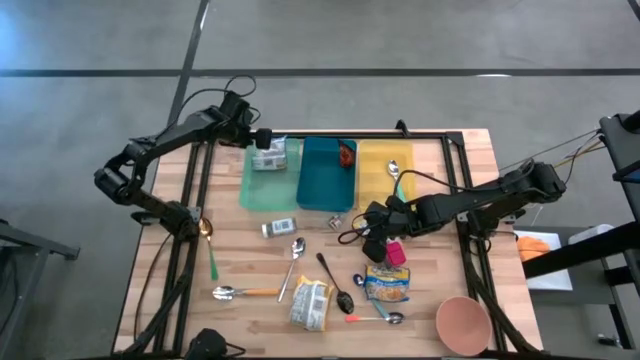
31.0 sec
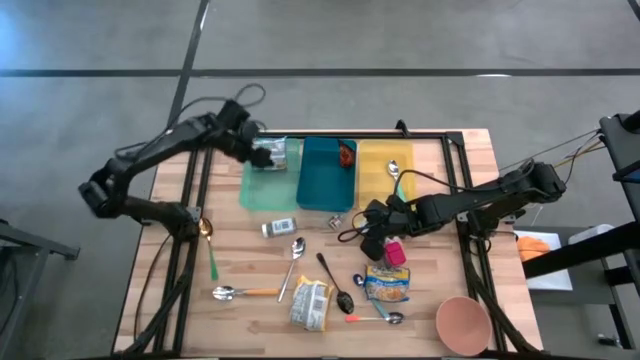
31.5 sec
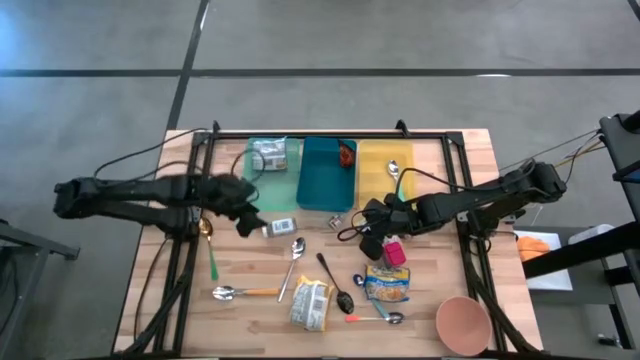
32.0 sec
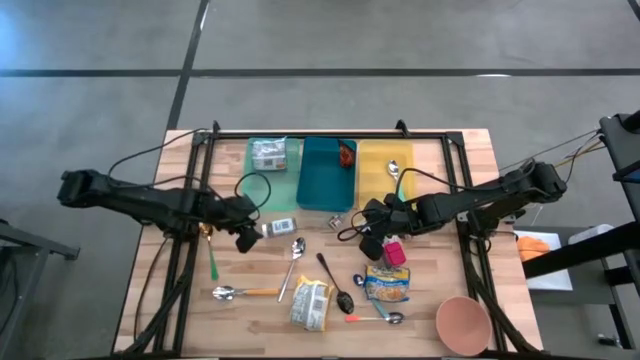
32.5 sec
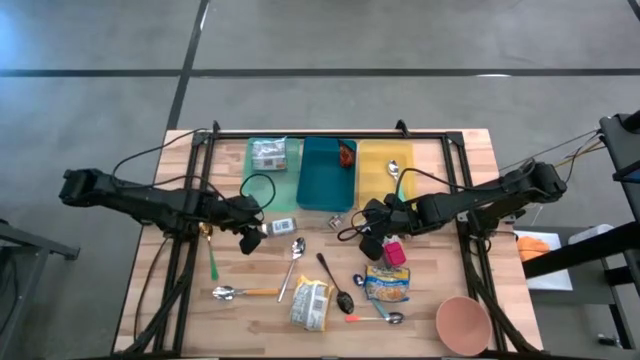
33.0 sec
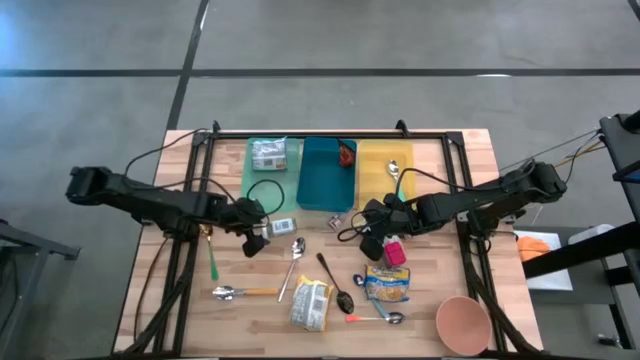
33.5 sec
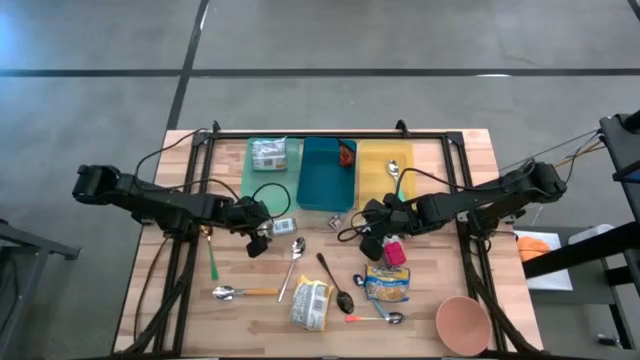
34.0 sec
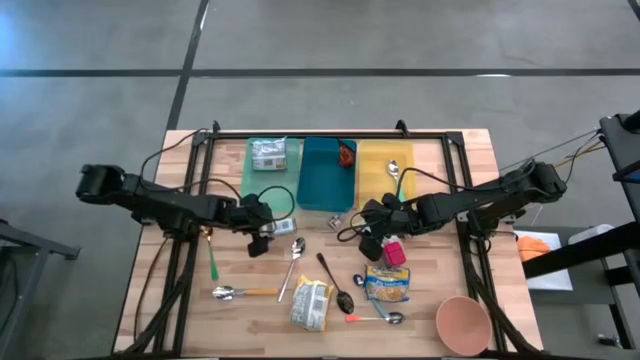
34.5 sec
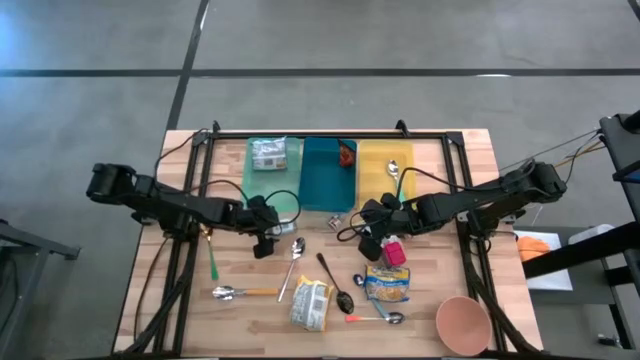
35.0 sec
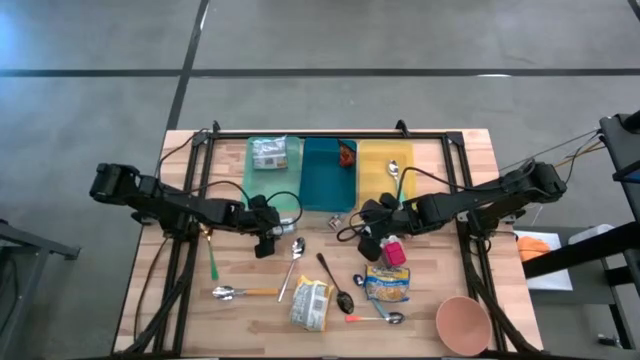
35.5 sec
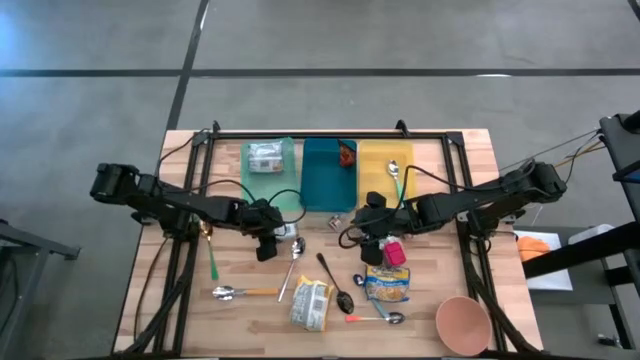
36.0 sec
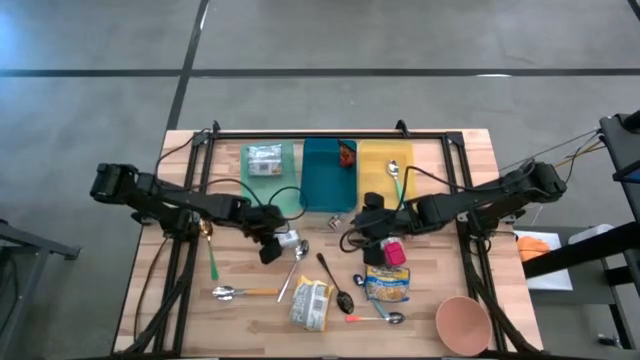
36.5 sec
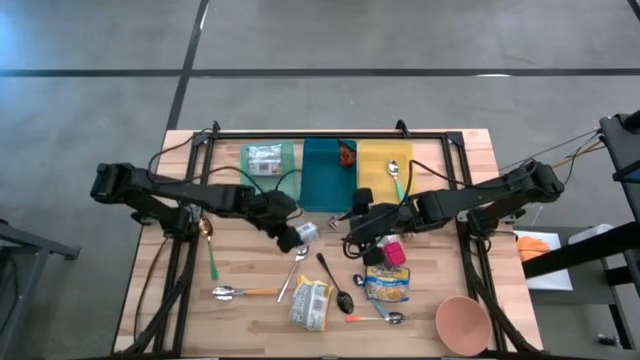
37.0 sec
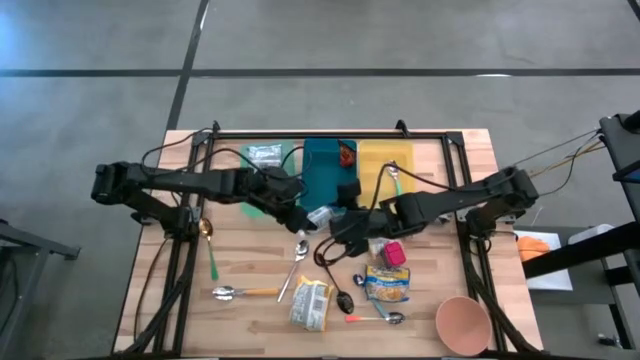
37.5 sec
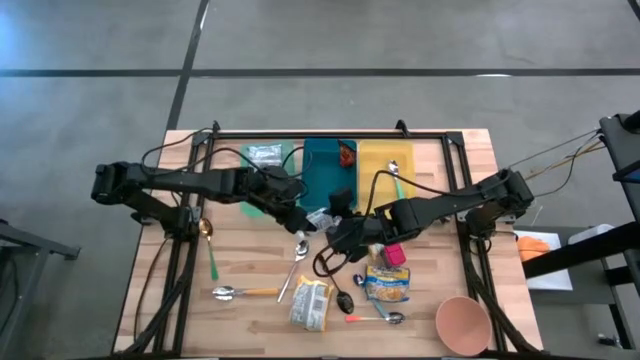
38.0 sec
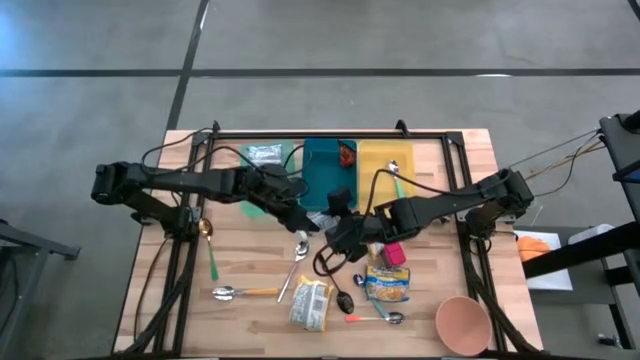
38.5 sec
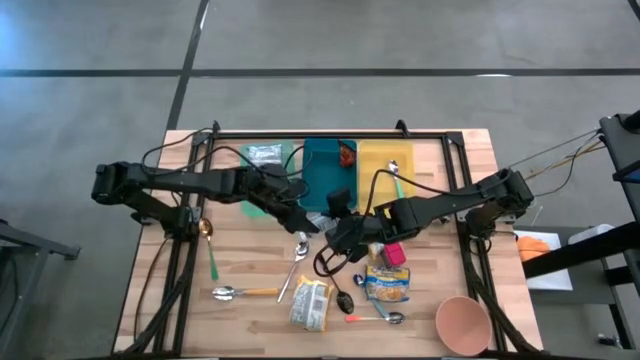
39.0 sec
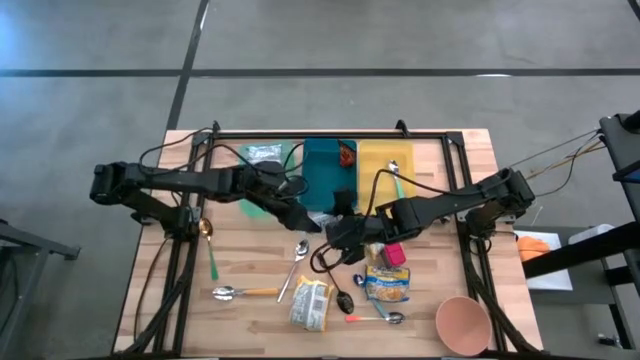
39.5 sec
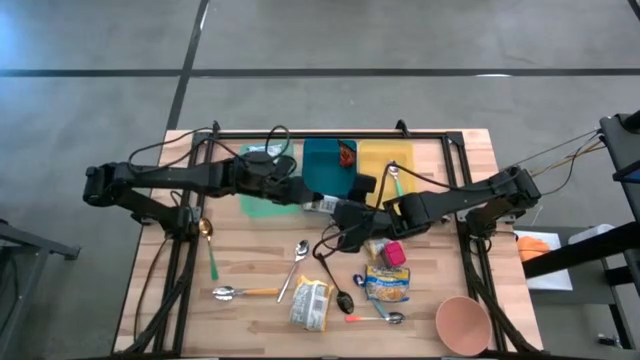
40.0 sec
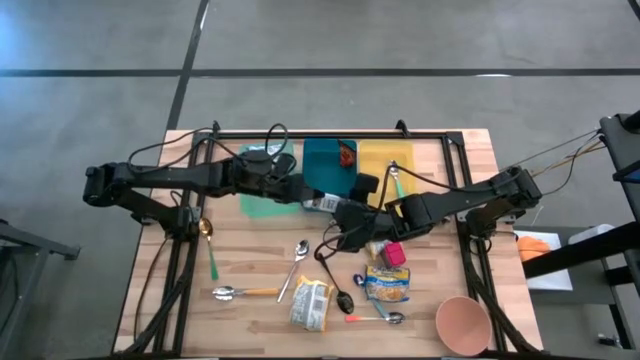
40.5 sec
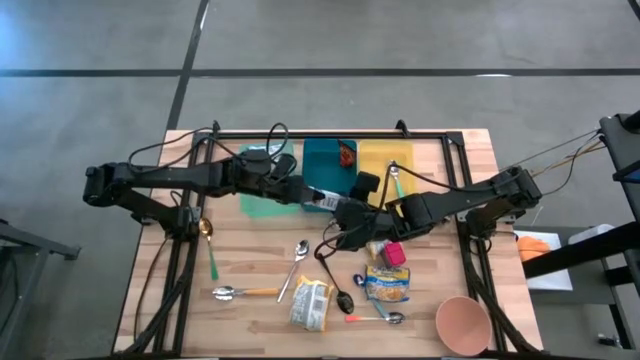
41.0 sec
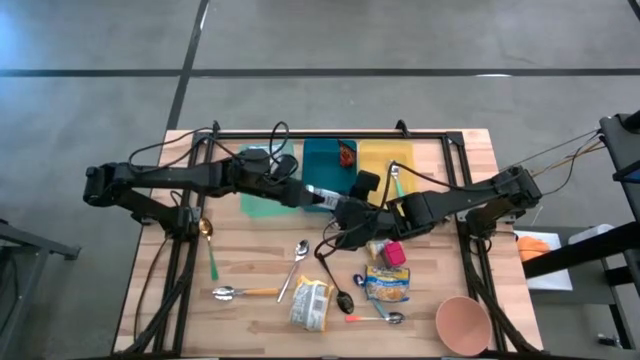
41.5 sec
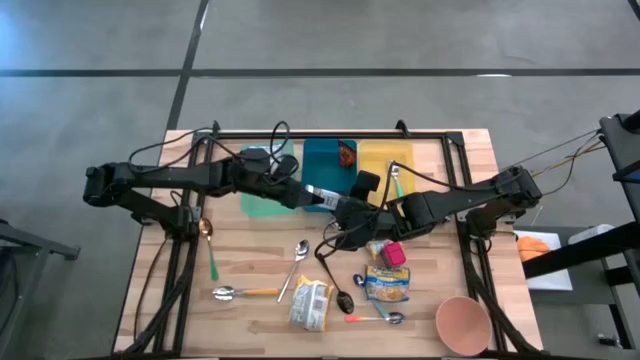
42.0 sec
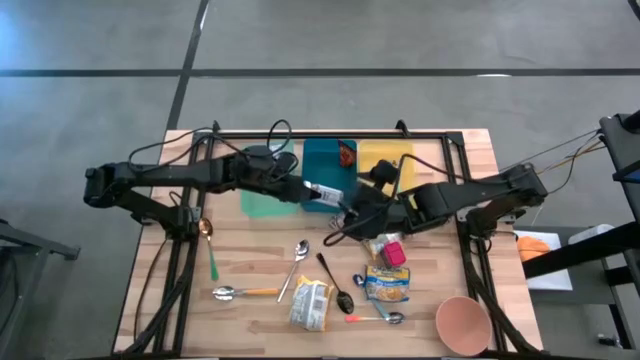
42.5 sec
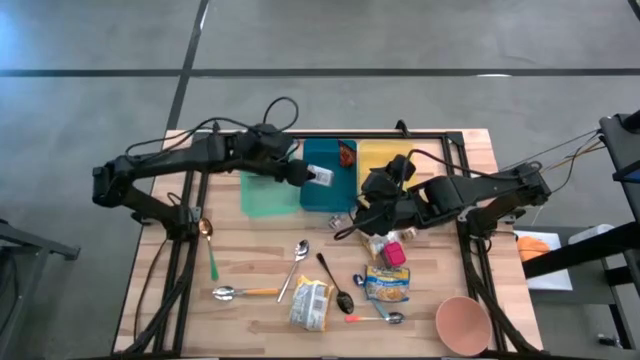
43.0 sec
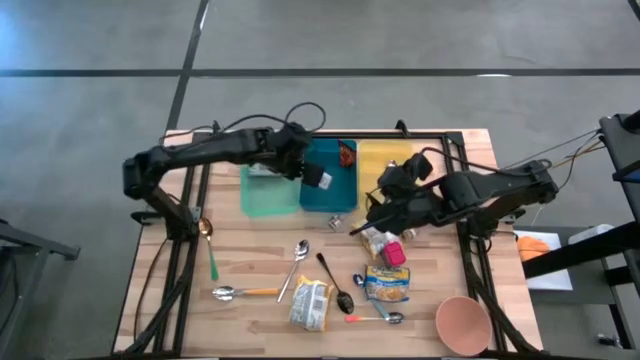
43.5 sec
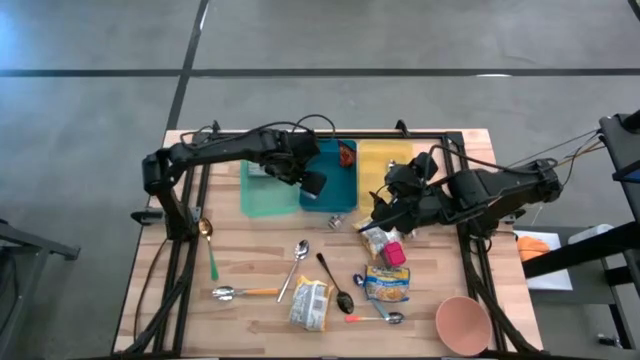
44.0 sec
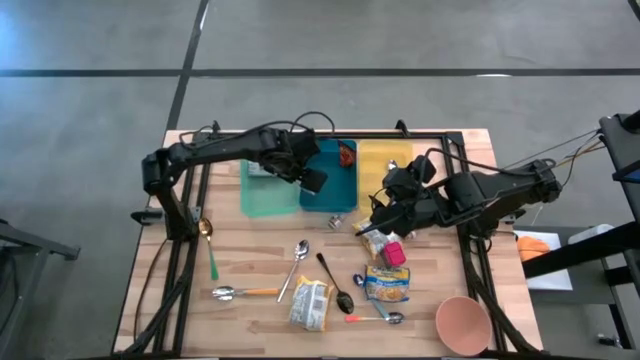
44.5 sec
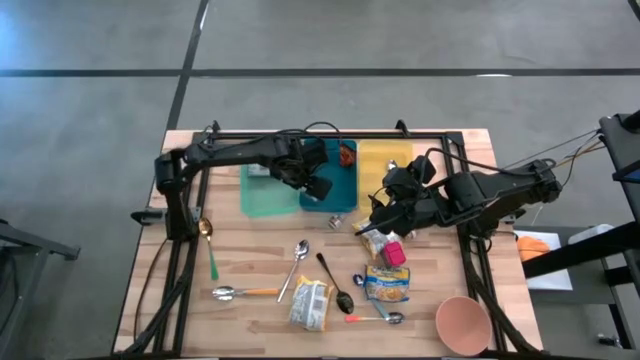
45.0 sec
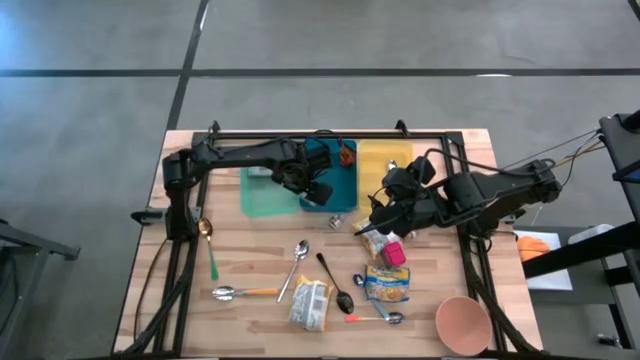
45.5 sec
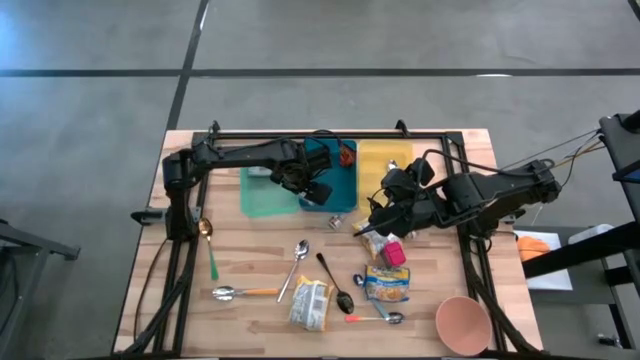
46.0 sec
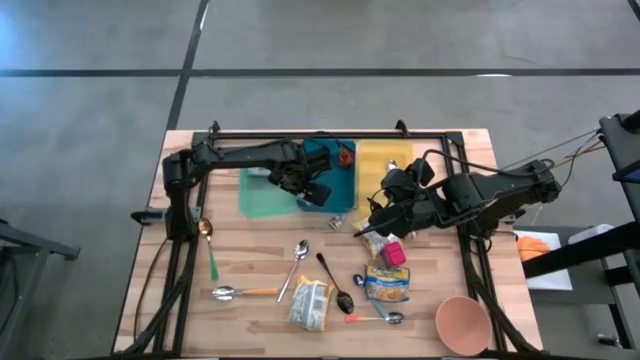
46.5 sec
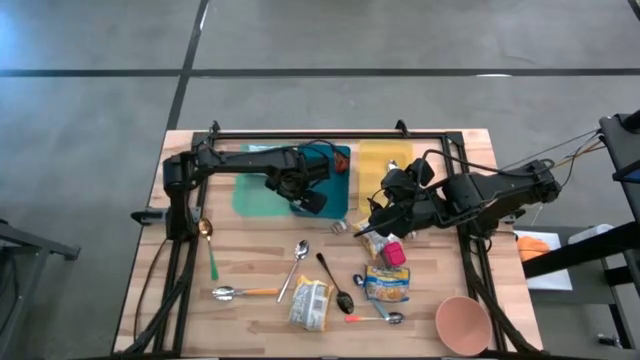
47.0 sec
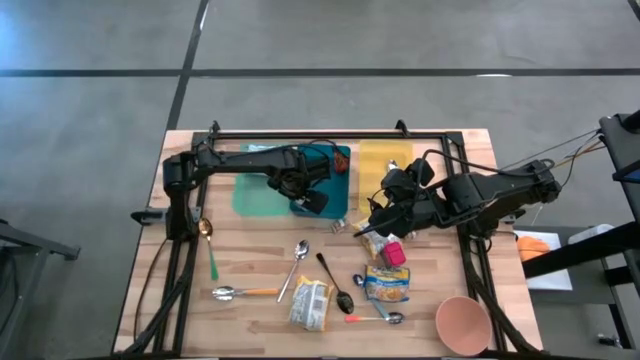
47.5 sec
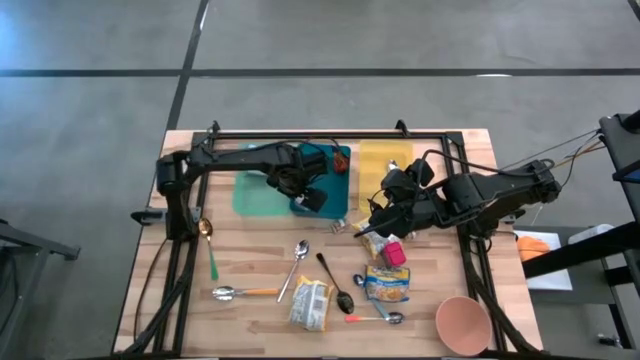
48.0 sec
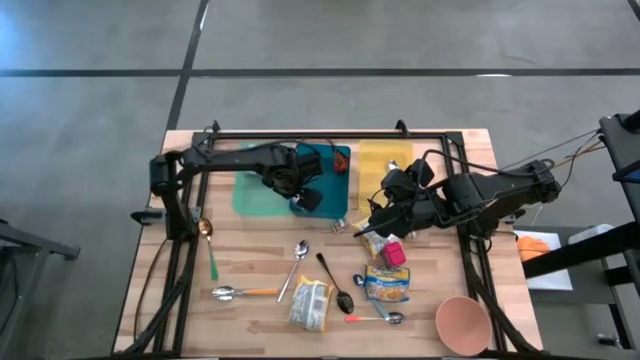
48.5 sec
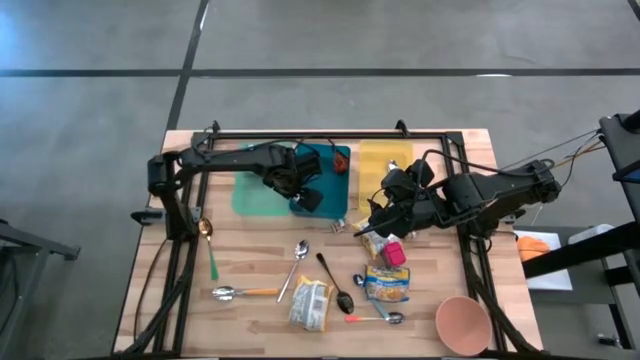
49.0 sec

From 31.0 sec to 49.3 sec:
Put the white seasoning bottle into the blue bin
